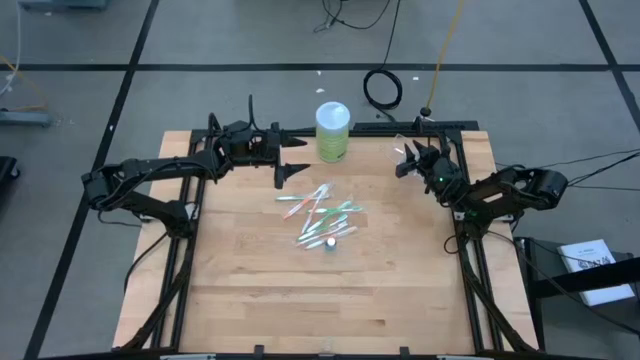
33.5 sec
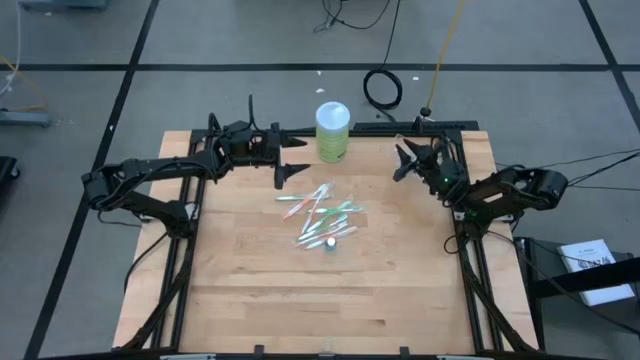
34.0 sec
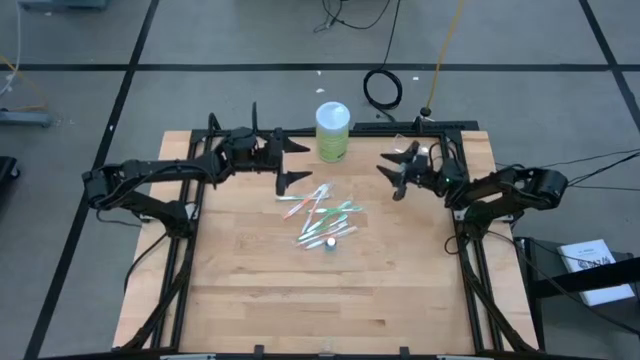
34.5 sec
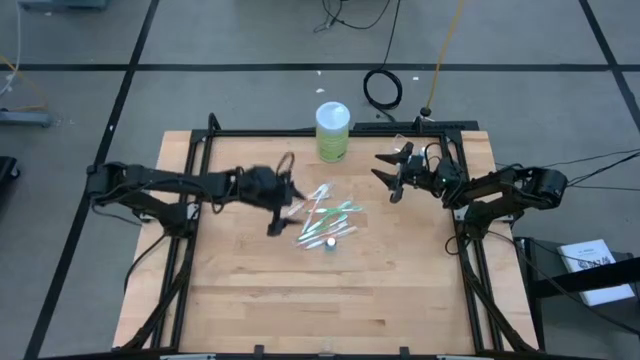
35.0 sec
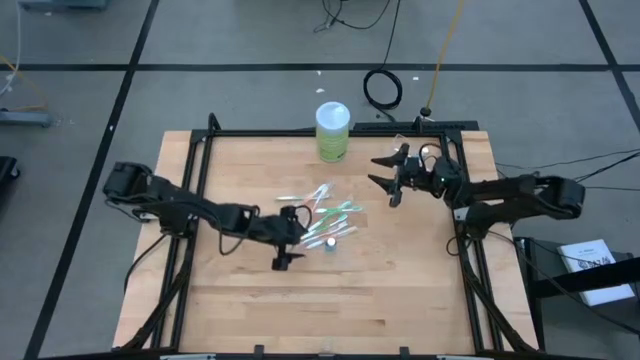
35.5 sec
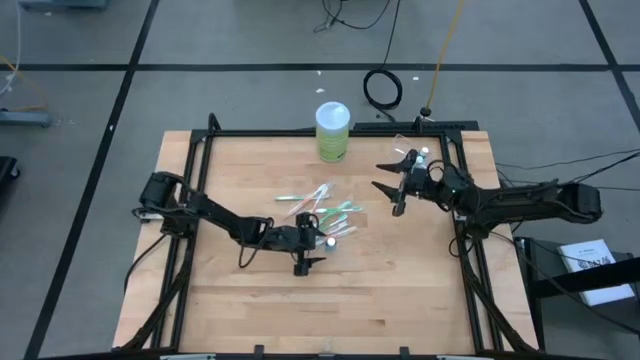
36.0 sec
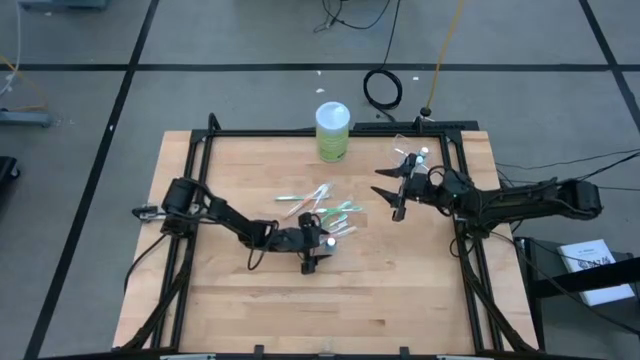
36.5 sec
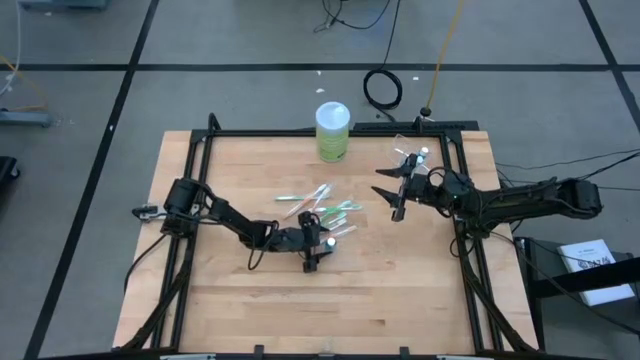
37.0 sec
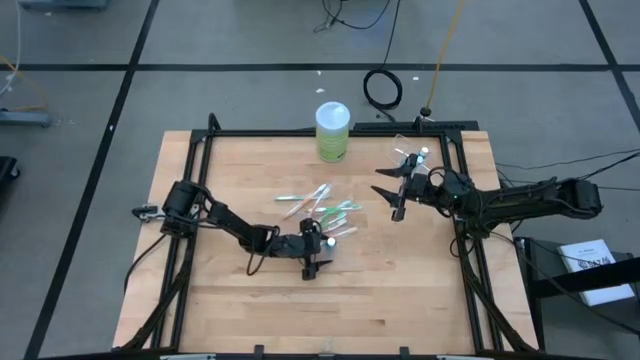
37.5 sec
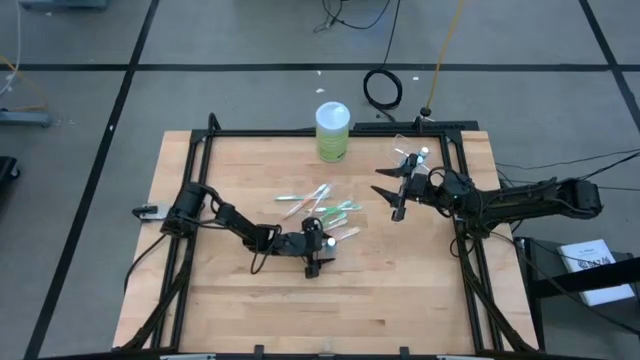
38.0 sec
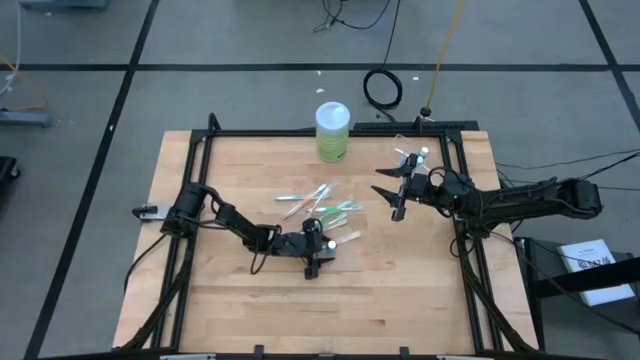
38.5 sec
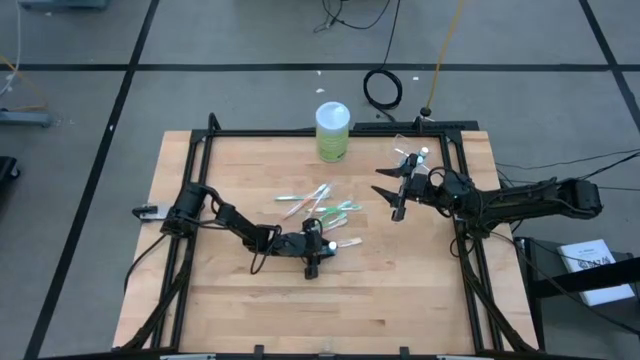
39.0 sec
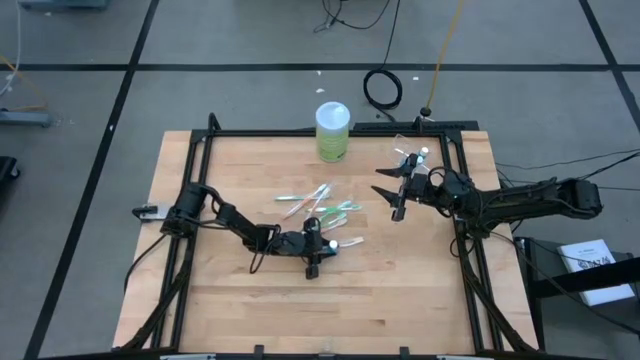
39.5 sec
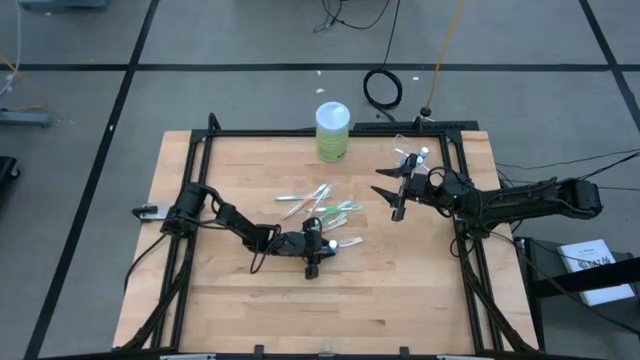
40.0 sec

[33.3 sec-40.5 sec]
Task: Pick & Place toothbrushing station
Put the blue mouthwash bottle into the transparent organizer

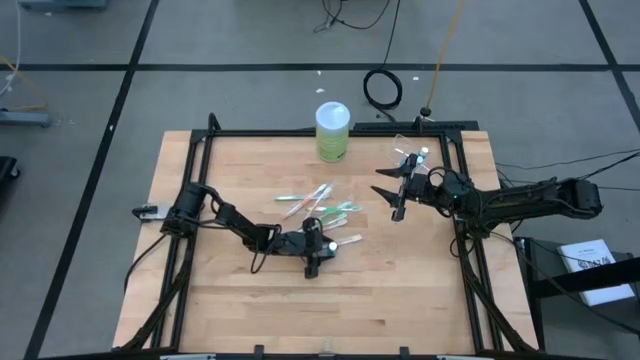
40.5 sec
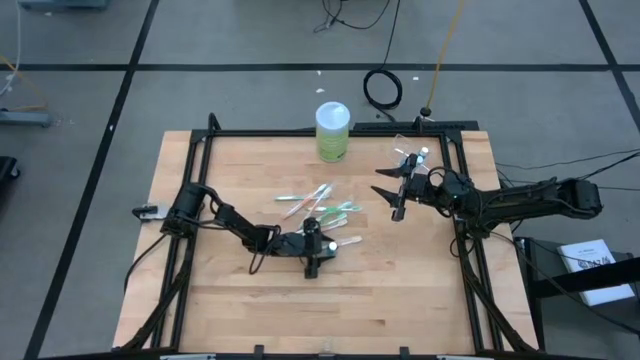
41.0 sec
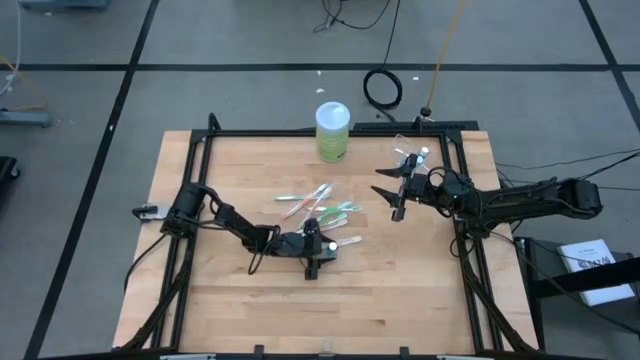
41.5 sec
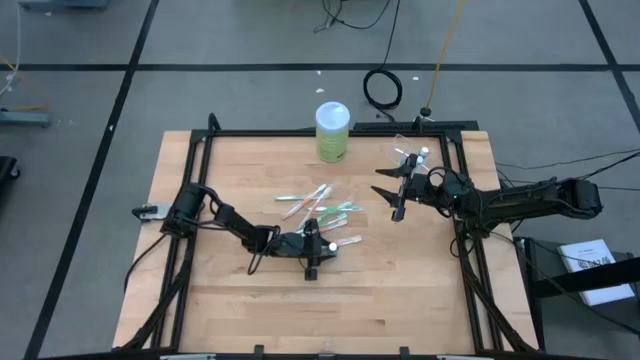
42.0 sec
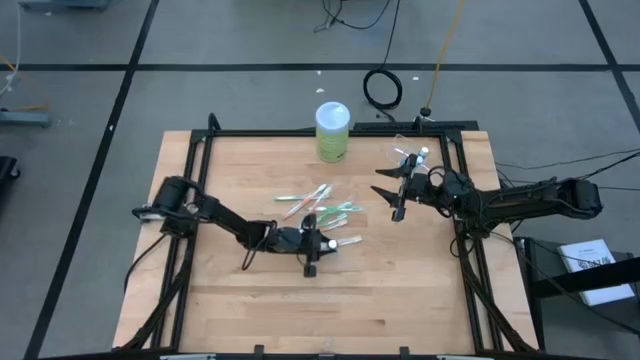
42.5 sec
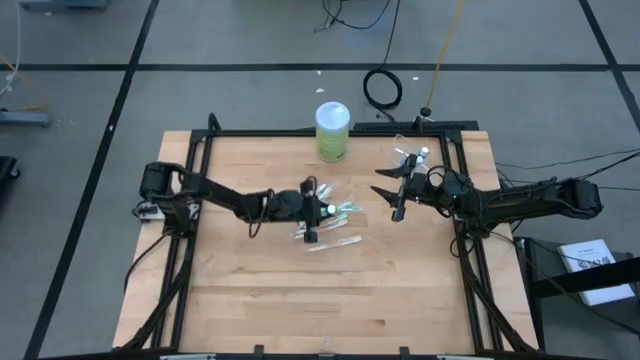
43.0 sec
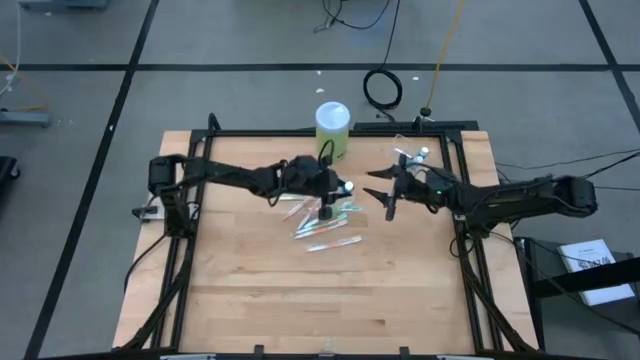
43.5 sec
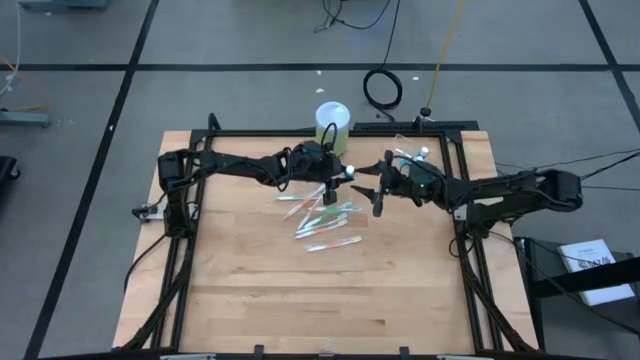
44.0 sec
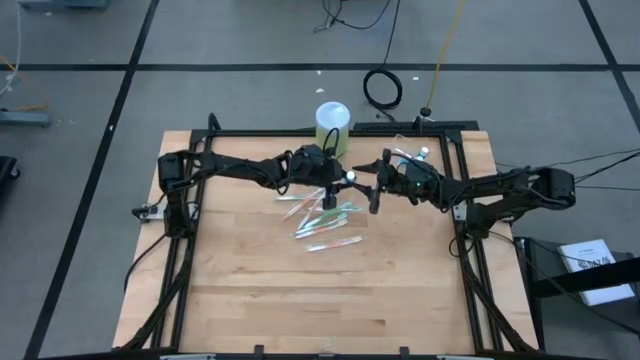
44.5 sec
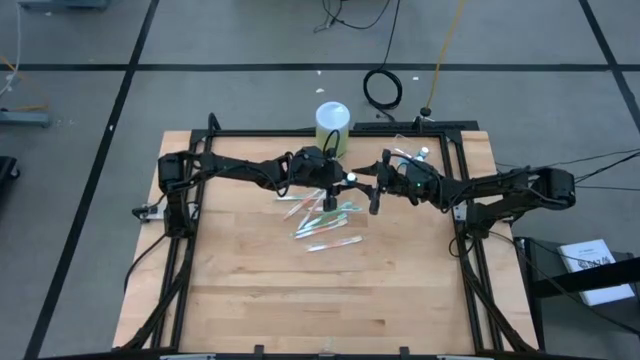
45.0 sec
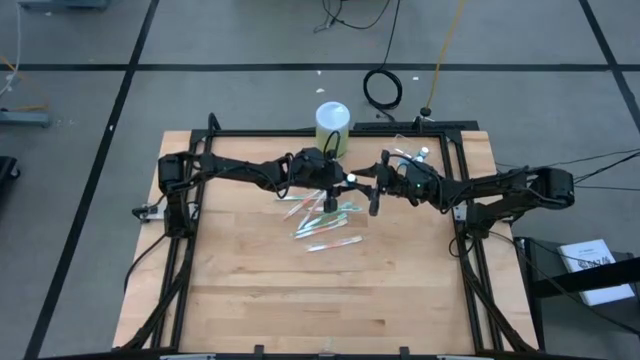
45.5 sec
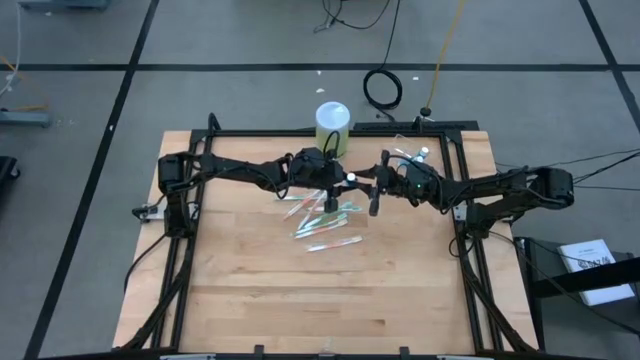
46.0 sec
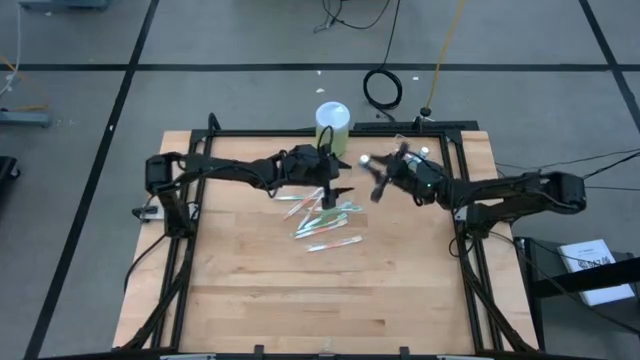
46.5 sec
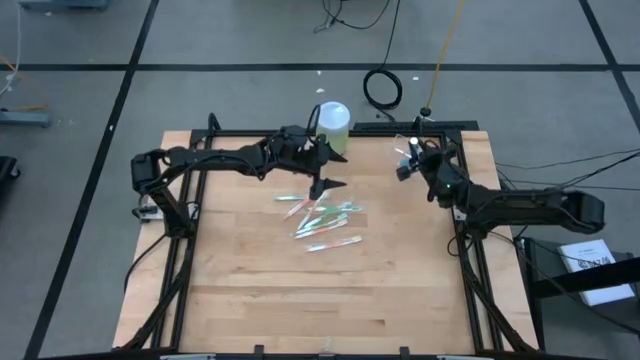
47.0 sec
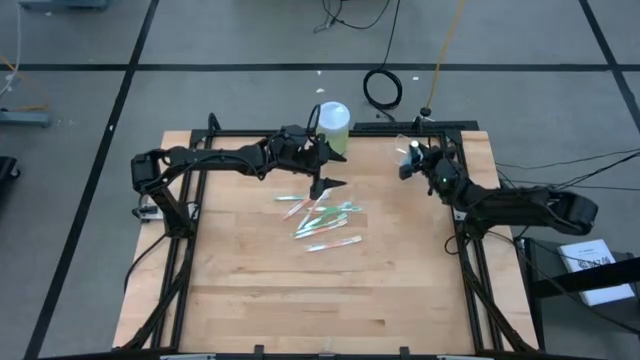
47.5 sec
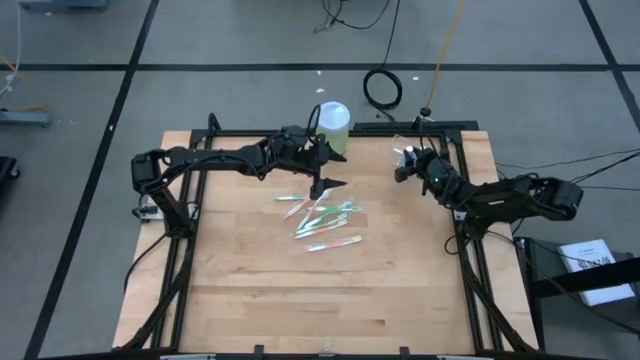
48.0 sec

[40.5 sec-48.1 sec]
Put the blue mouthwash bottle into the transparent organizer

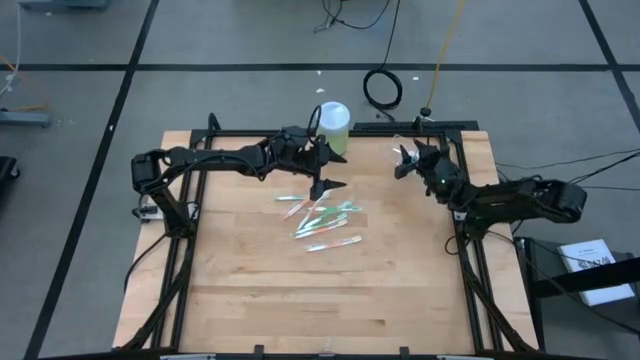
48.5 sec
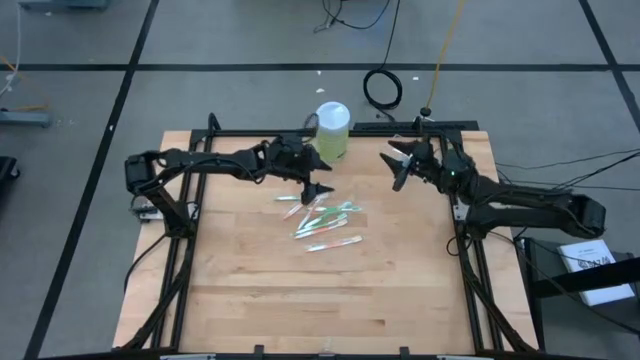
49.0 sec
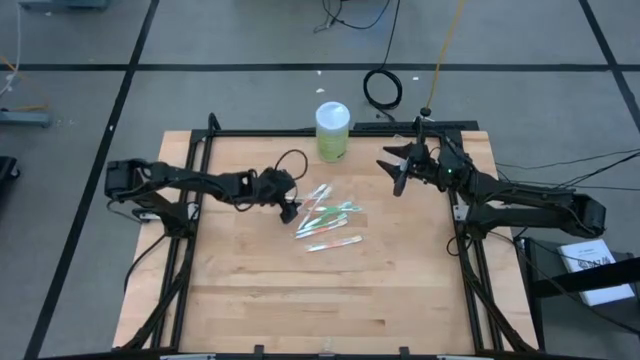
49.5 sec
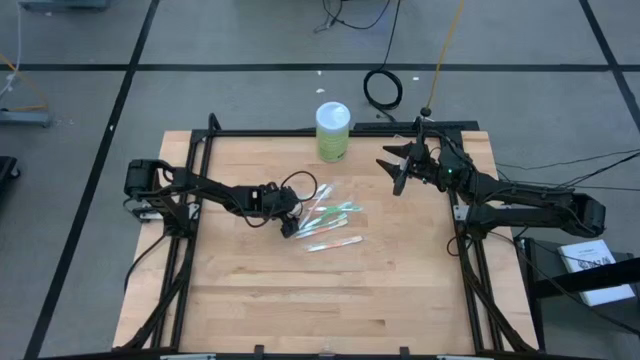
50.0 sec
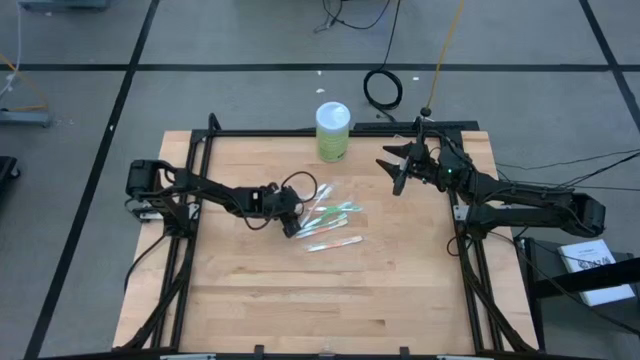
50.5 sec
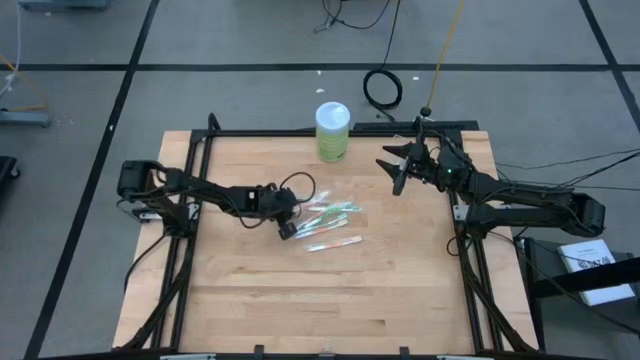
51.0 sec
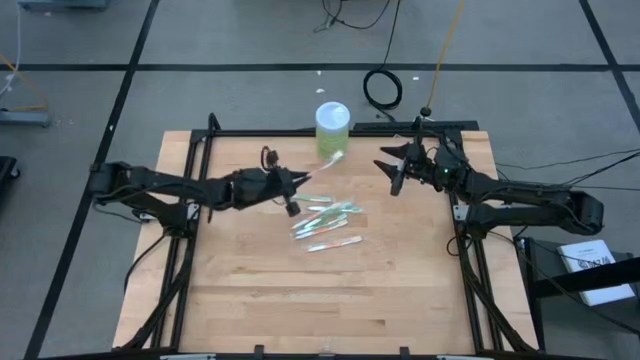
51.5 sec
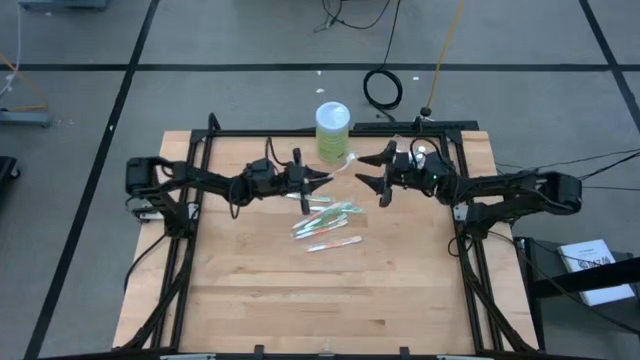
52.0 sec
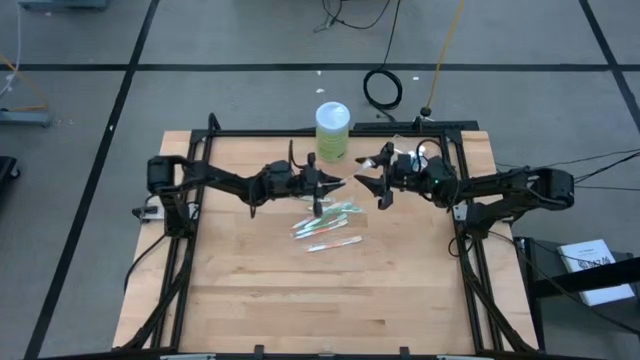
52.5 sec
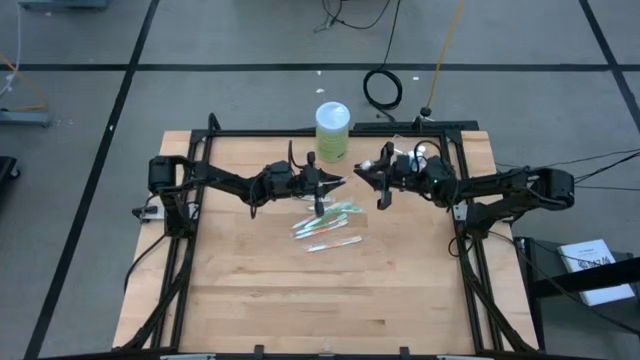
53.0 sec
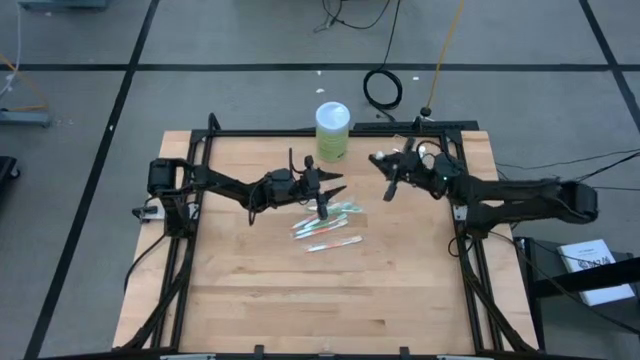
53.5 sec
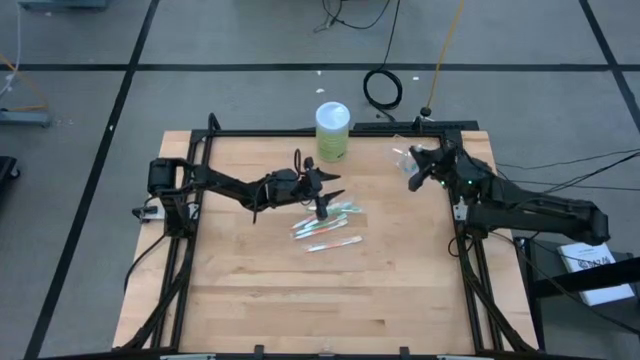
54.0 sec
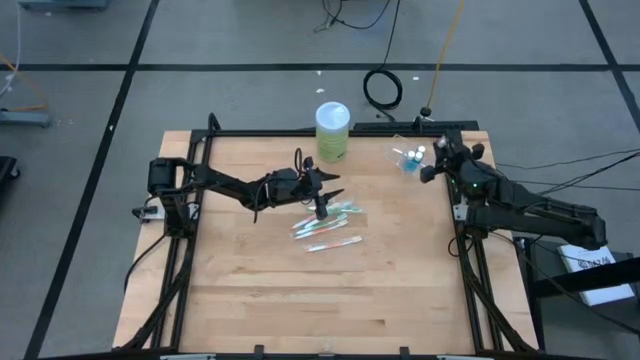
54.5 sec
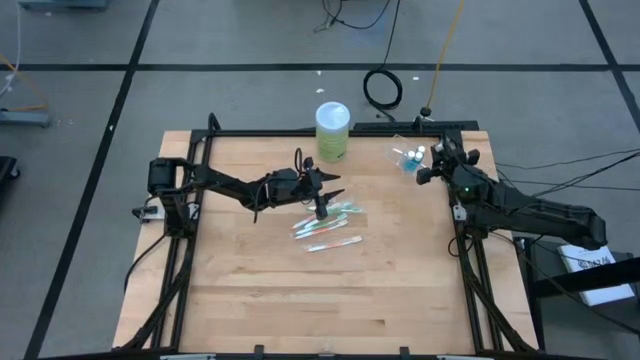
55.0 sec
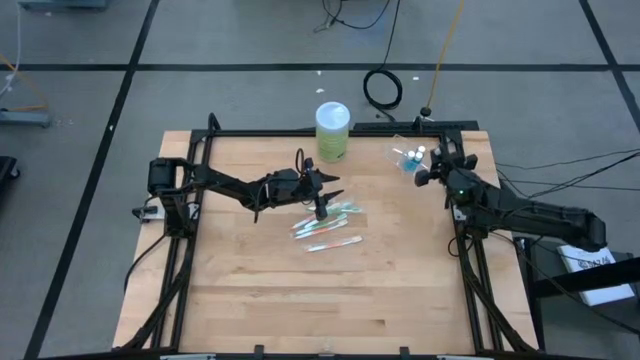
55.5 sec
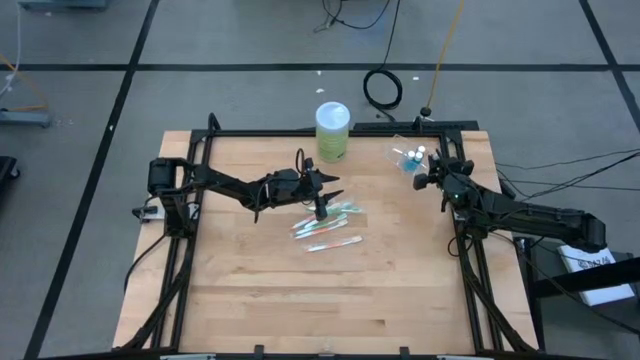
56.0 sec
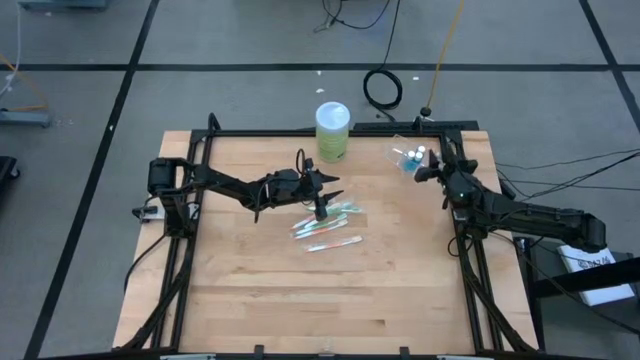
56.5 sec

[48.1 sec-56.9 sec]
Put the orange toothbrush into the transparent organizer
